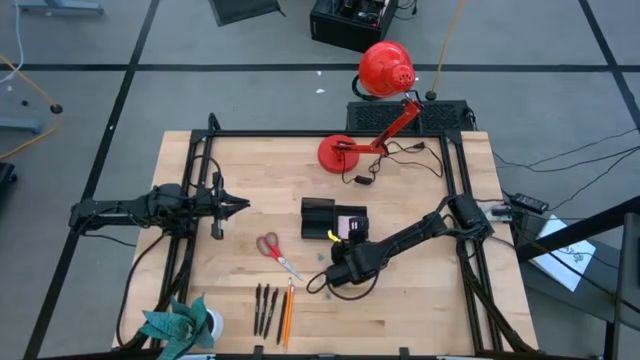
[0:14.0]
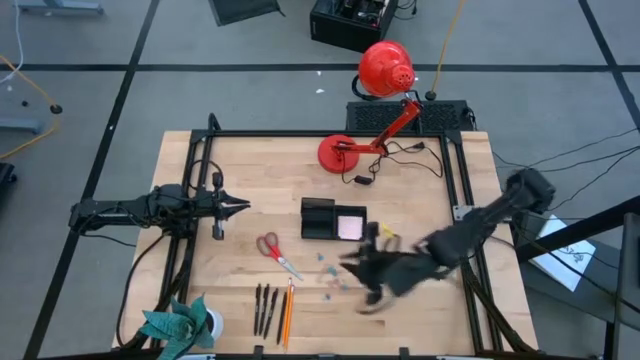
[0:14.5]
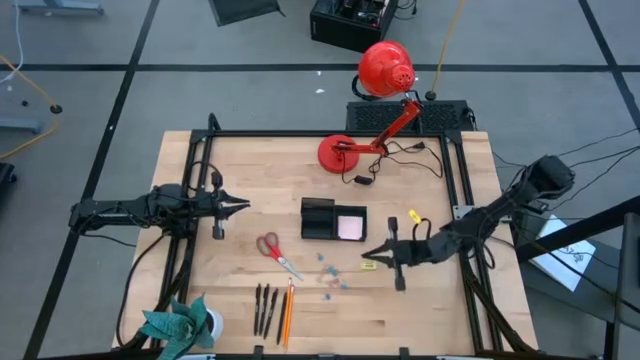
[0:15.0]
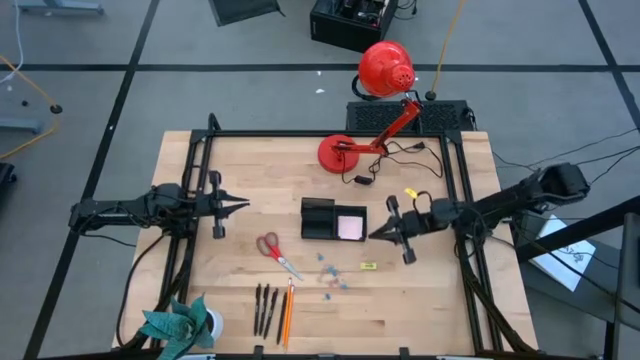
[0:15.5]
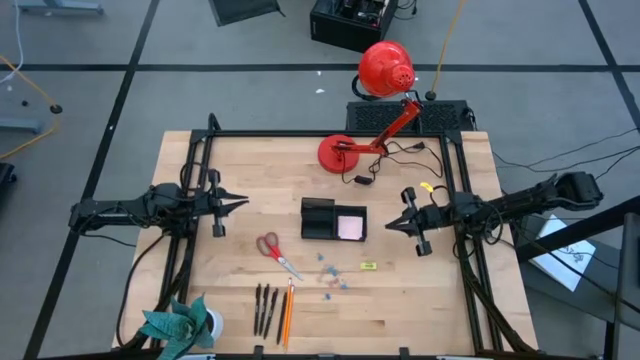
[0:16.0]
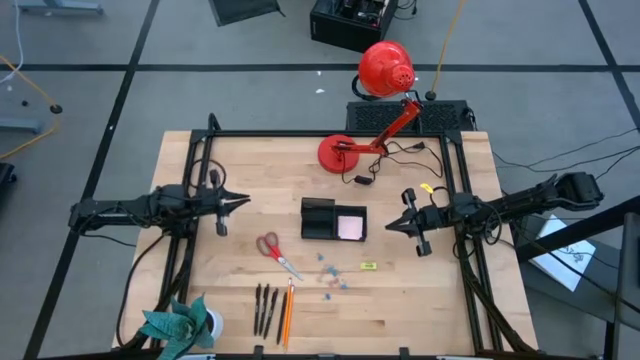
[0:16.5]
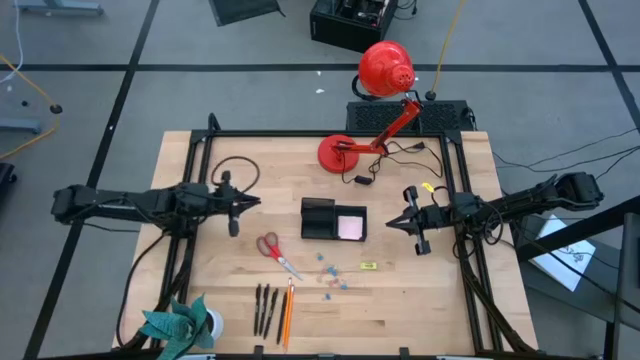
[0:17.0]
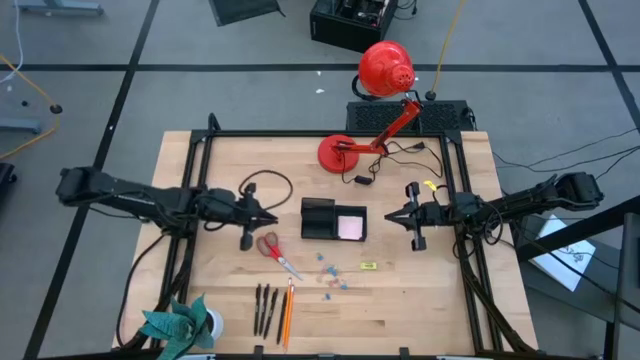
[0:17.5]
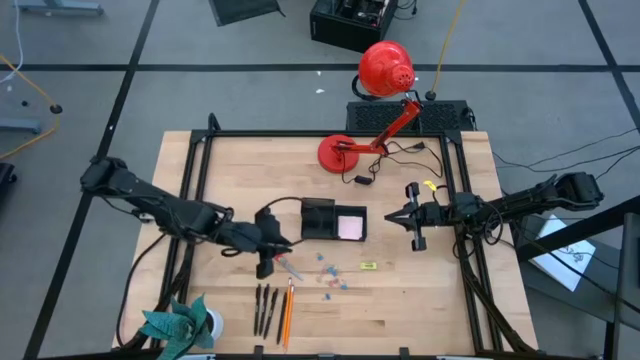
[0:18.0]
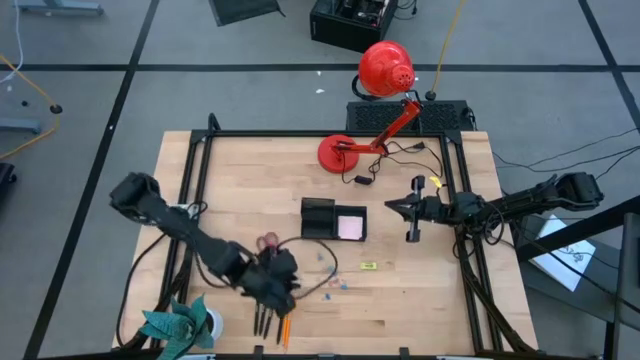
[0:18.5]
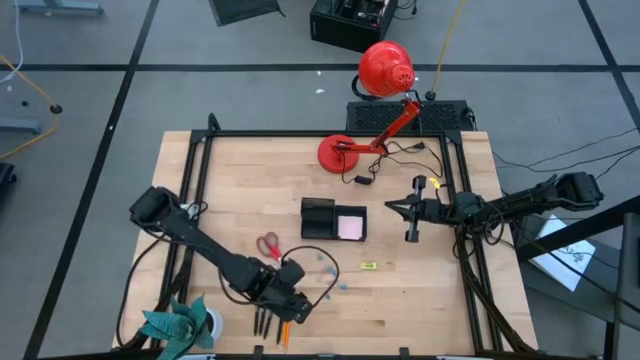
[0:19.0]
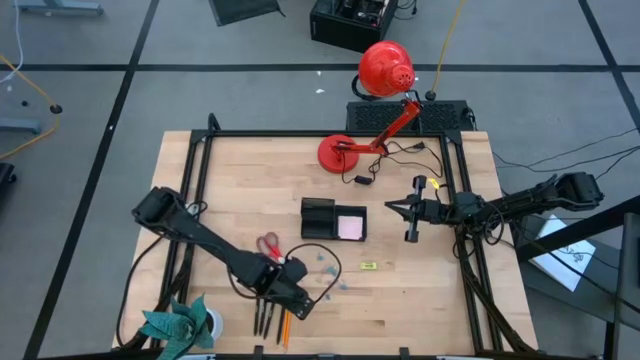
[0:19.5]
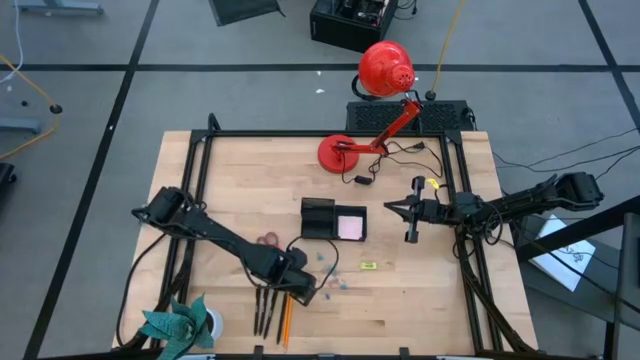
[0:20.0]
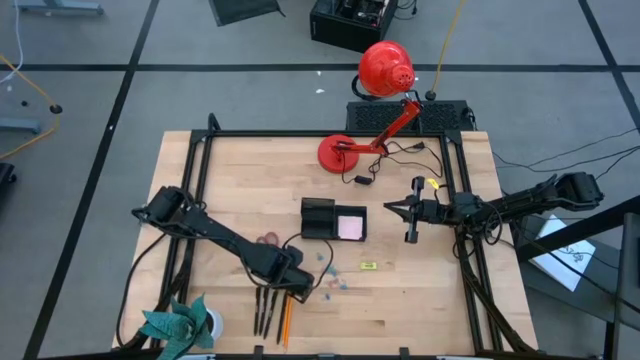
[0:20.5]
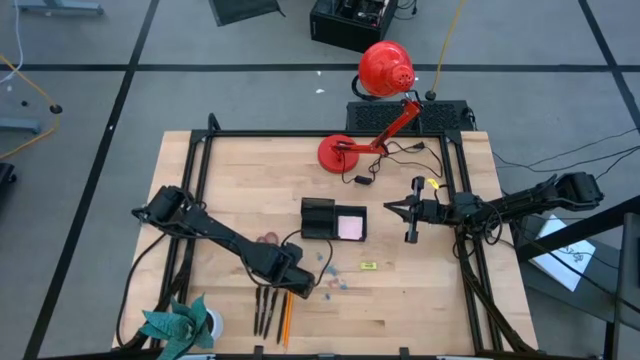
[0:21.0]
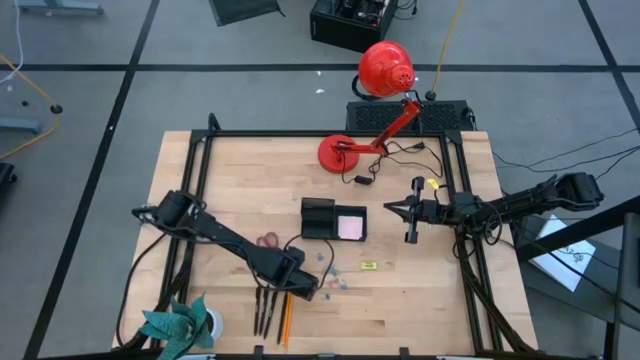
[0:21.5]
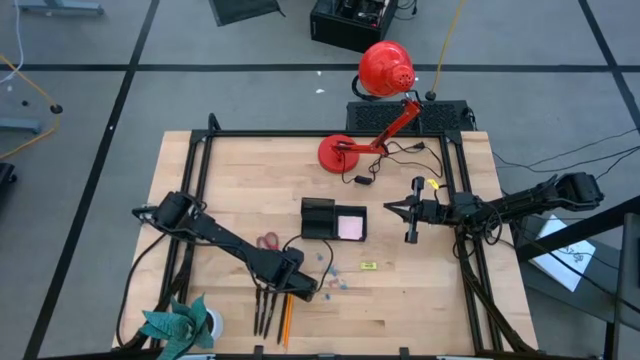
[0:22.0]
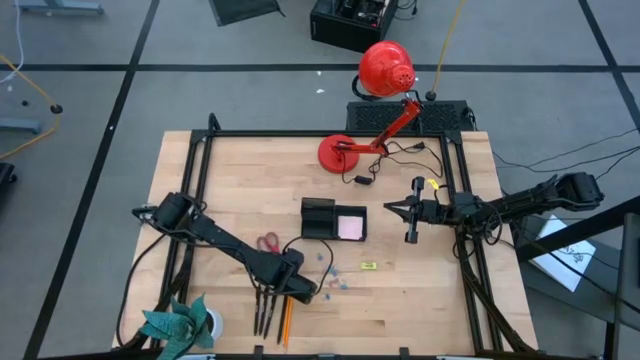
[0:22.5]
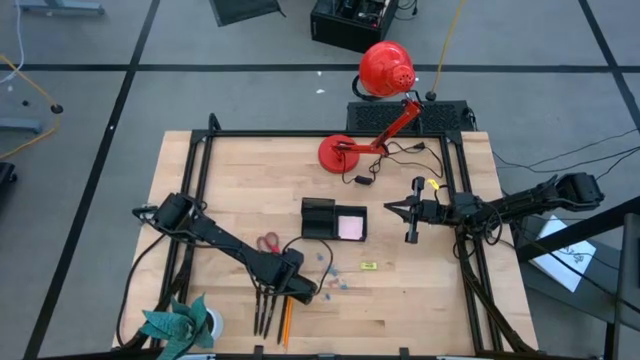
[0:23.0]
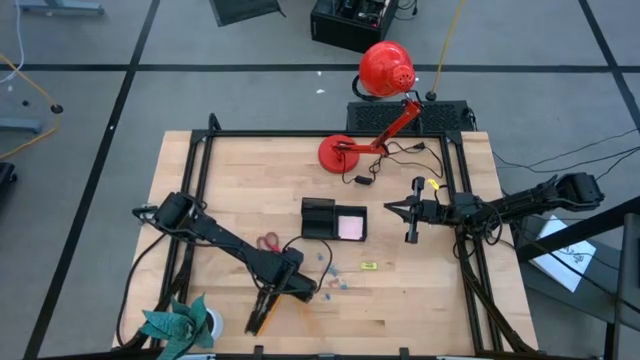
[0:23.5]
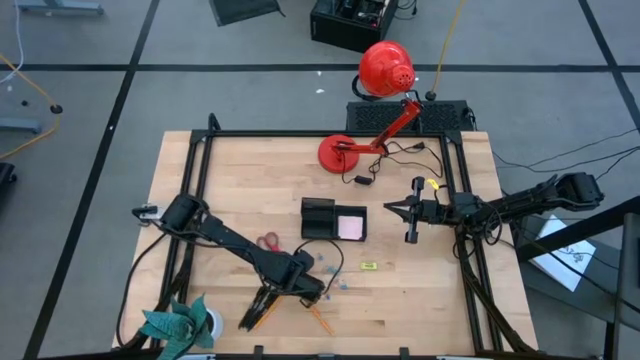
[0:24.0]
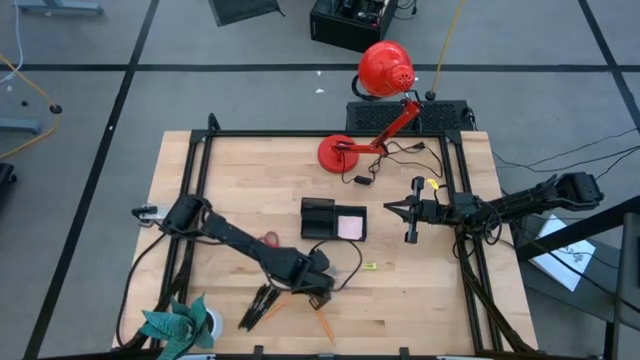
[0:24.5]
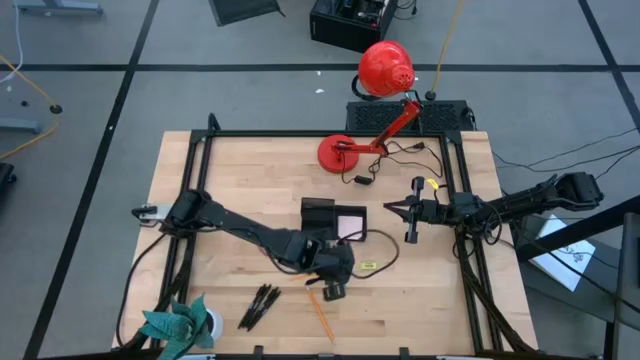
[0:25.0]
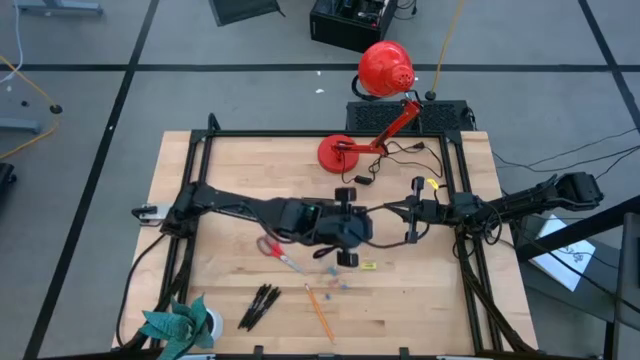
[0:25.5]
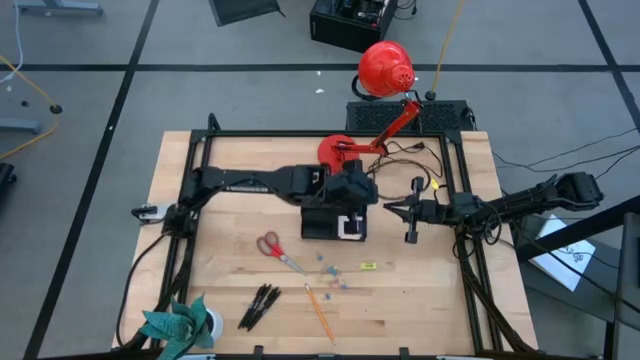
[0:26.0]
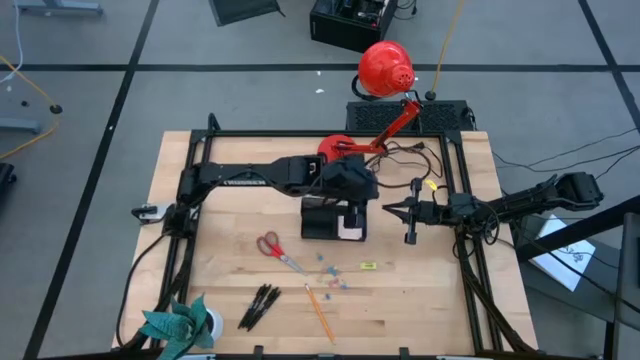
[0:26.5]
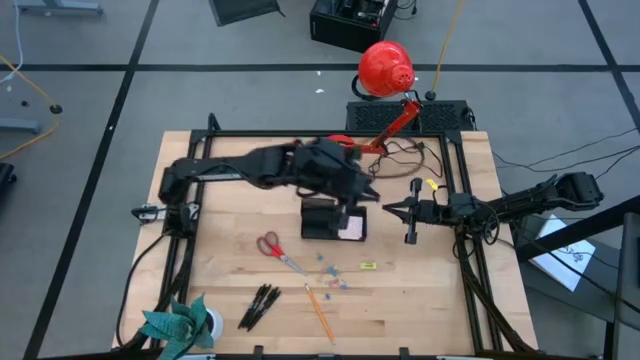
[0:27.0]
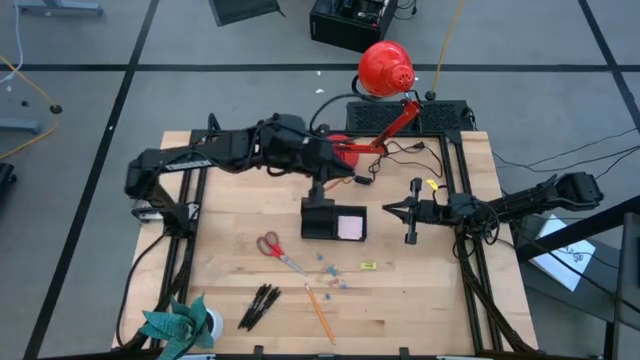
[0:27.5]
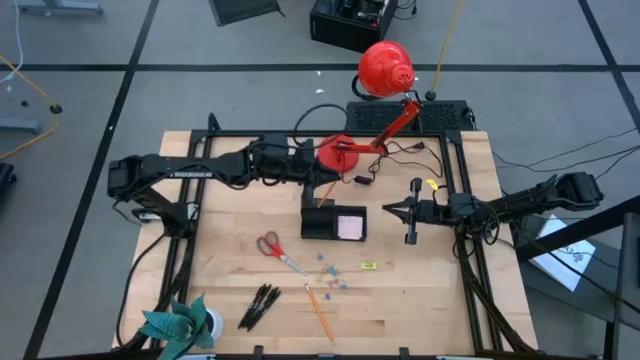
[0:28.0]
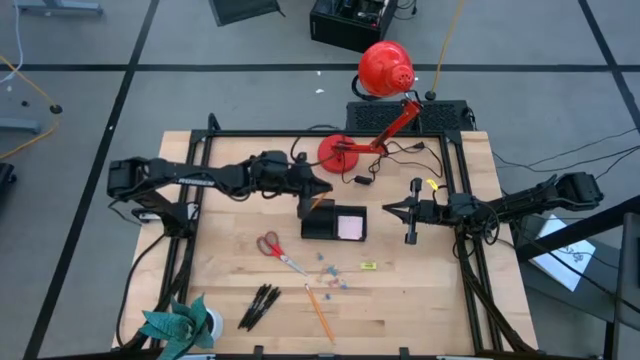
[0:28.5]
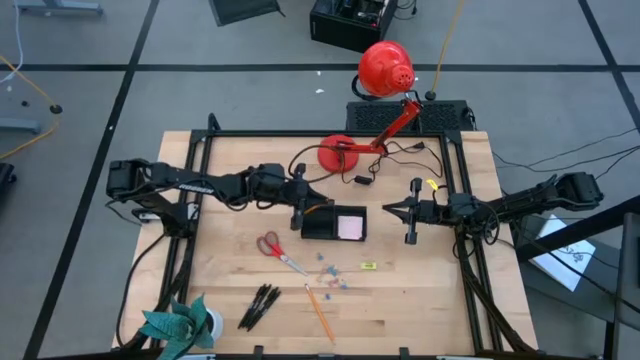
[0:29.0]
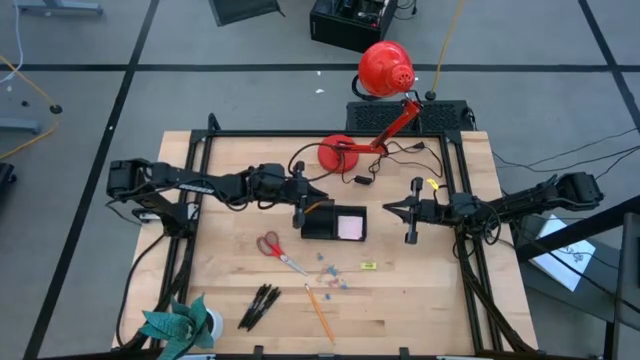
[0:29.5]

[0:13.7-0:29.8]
Task: Pick and place office supplies into organizer
Put the left pencil into the mesh desk organizer

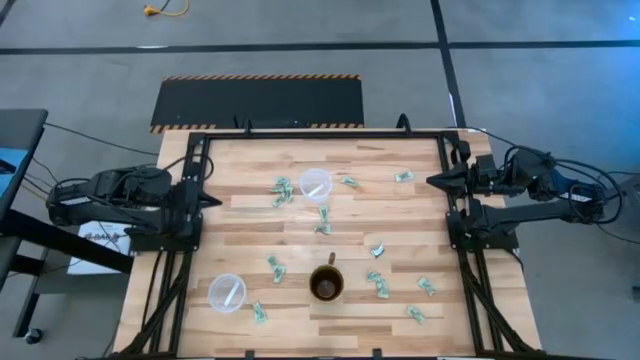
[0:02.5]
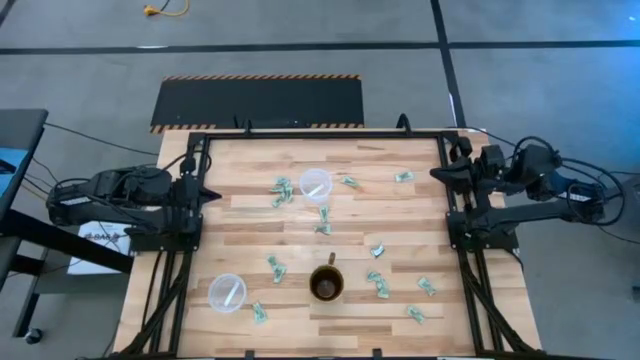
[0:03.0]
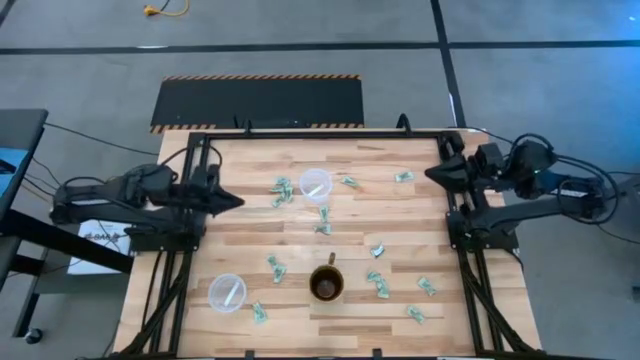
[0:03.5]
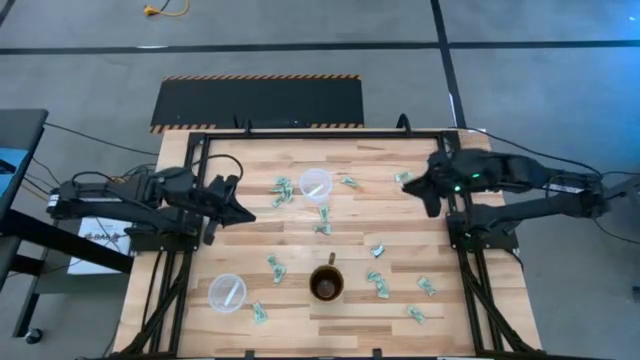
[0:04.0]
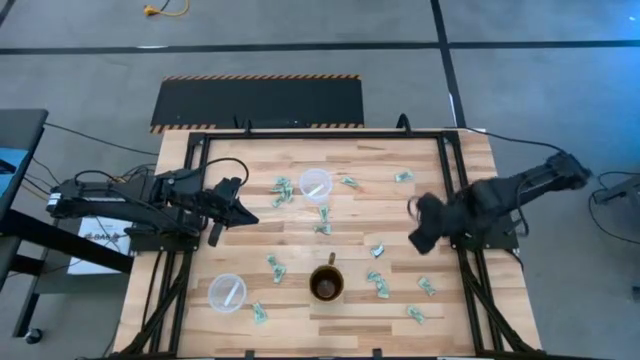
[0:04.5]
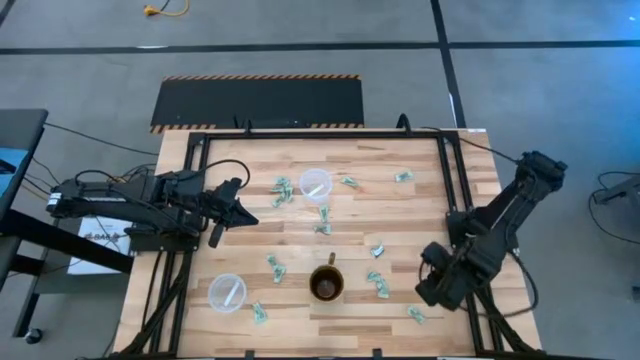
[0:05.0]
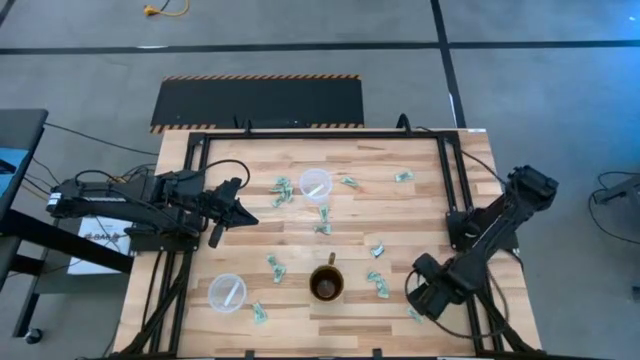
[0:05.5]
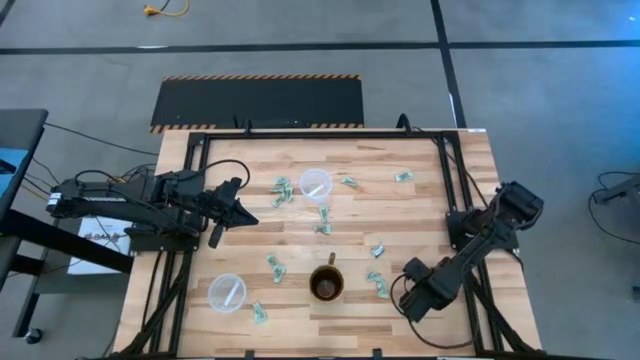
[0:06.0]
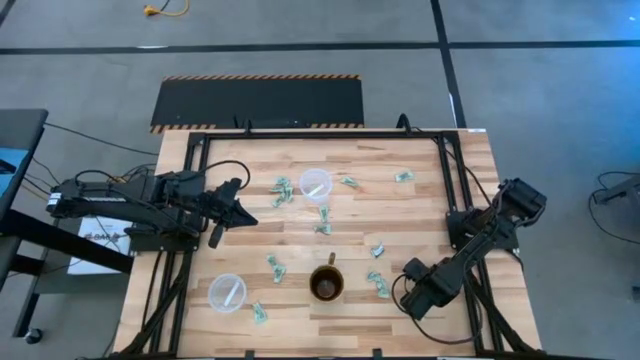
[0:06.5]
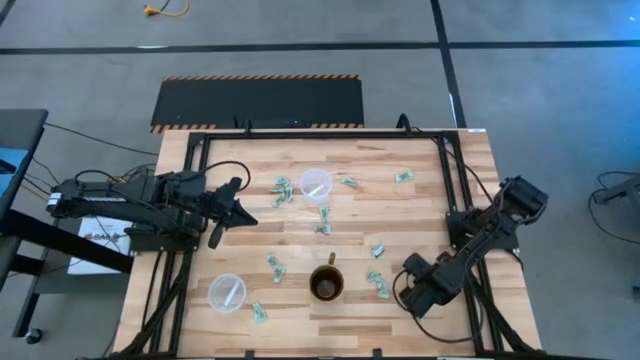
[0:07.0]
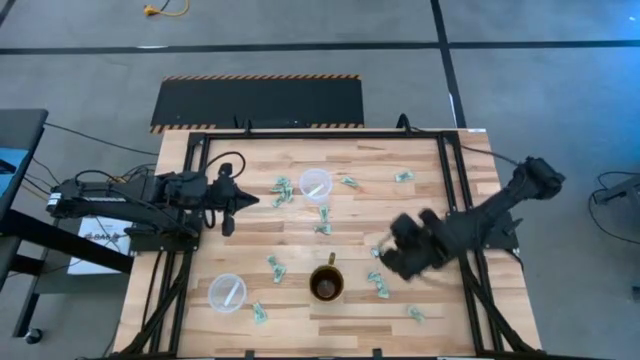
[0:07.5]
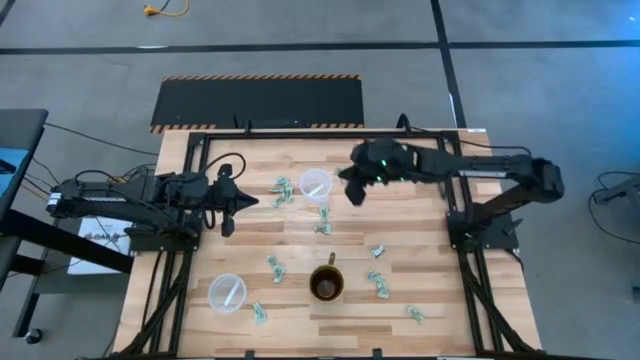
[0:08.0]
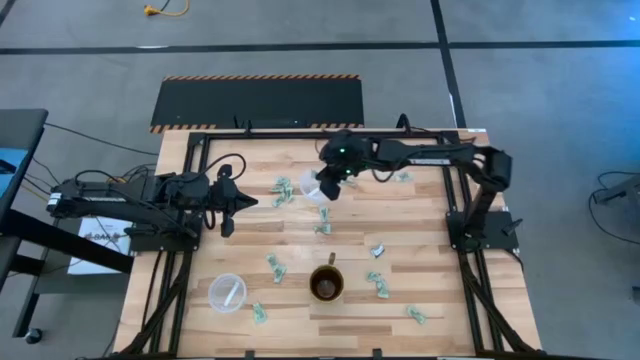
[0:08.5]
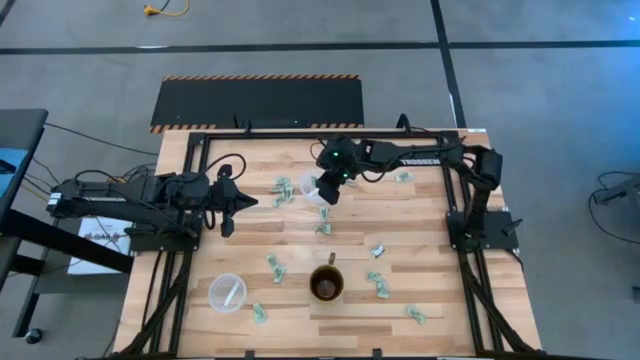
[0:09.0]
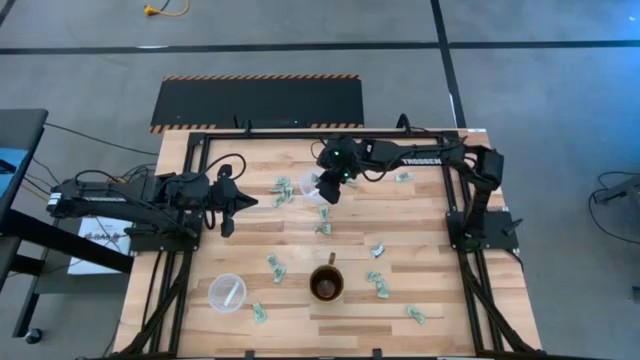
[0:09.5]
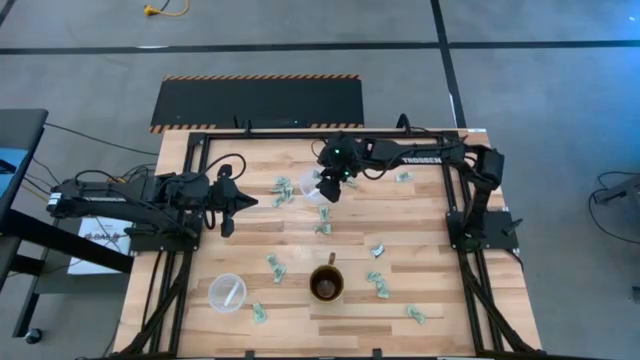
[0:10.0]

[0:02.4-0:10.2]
Task: Pick and place items into bin
Put the stevia packet into the top transparent bin
